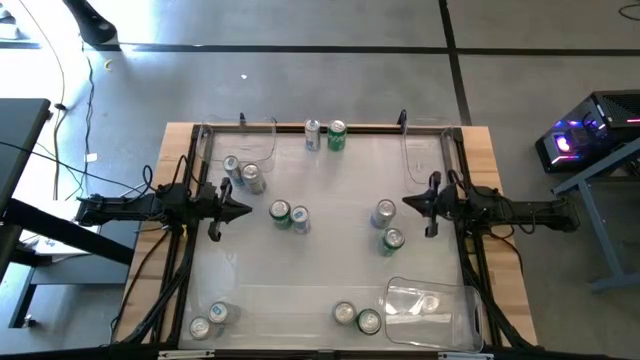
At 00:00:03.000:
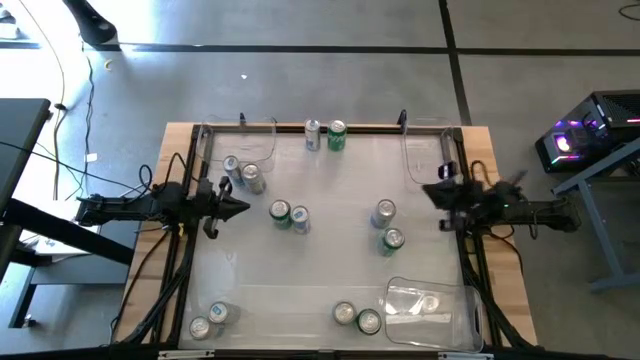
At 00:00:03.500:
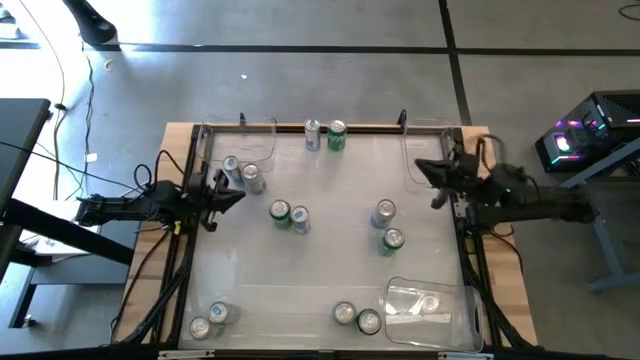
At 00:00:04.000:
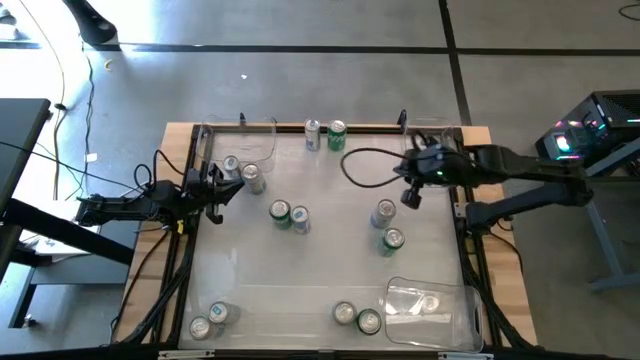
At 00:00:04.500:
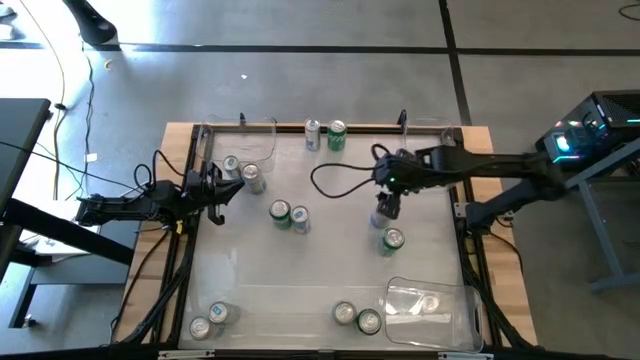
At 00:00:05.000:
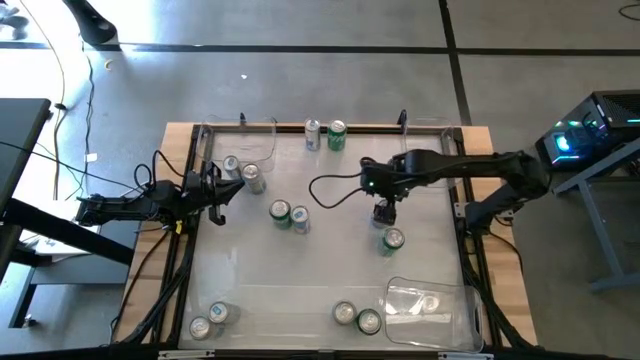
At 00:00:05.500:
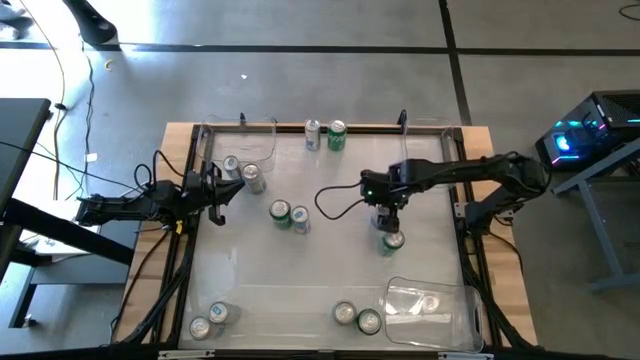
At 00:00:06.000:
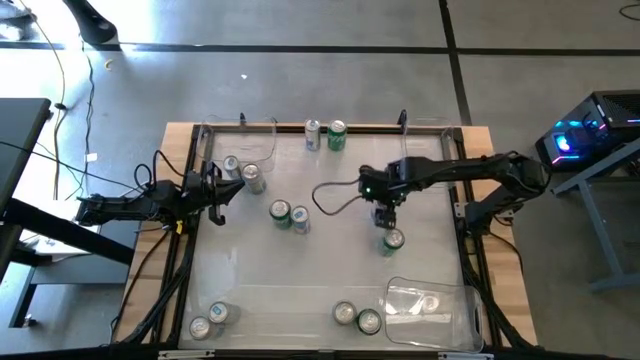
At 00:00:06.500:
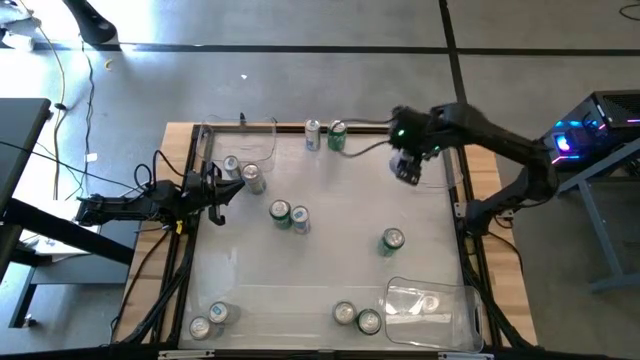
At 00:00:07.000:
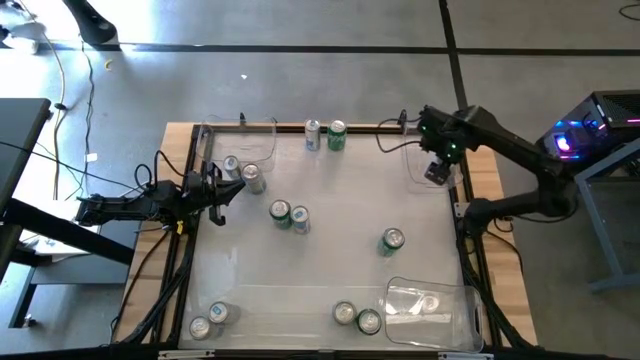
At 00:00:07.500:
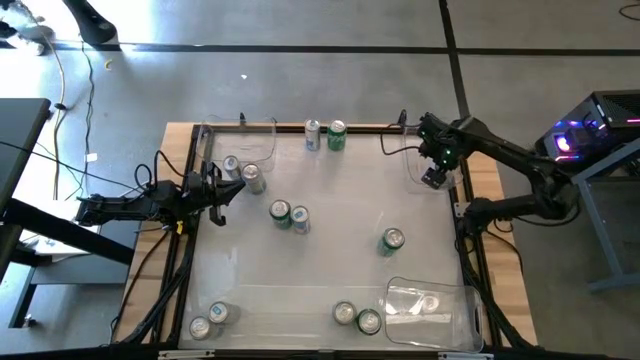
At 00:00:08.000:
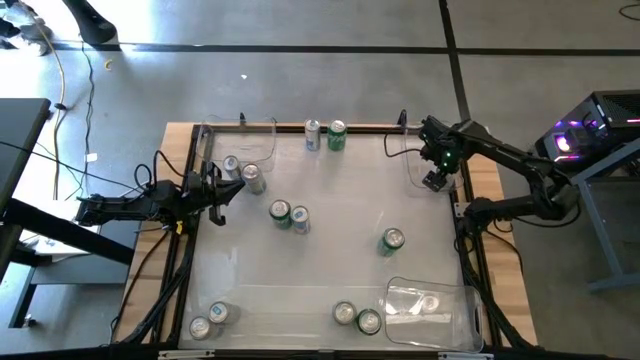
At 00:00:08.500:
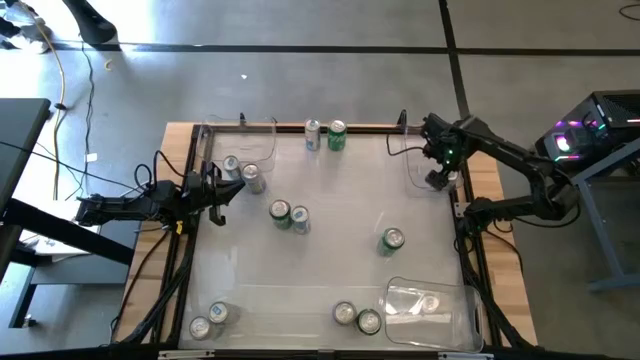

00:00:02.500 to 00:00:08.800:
Task: Sort soda cans
Put the top right blue white can into the top right transparent bin

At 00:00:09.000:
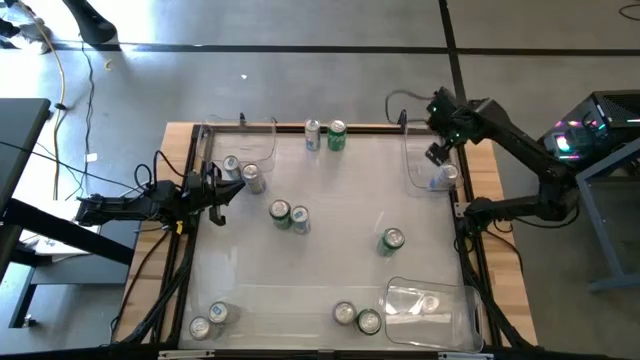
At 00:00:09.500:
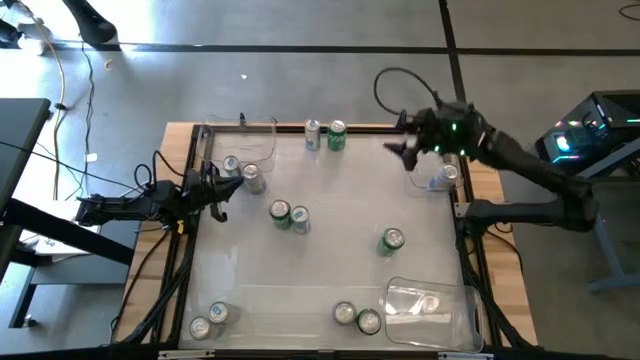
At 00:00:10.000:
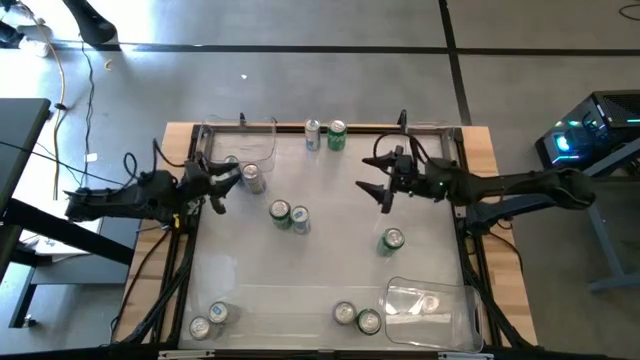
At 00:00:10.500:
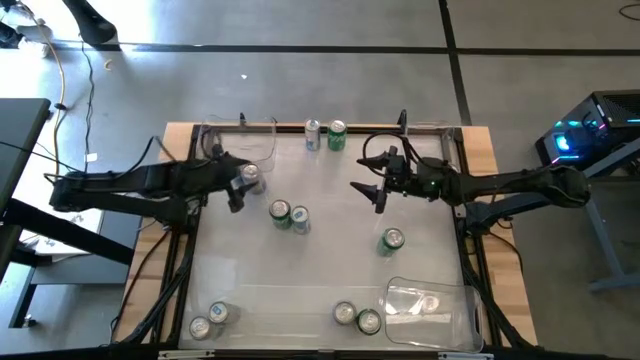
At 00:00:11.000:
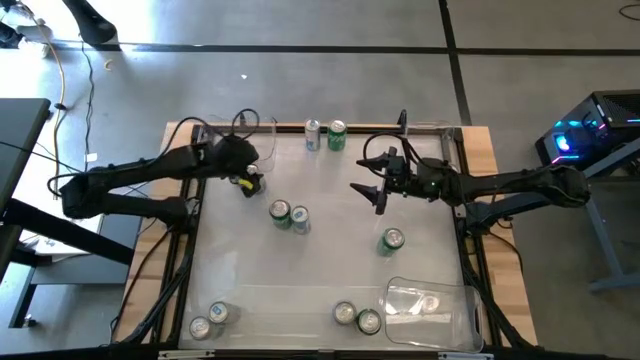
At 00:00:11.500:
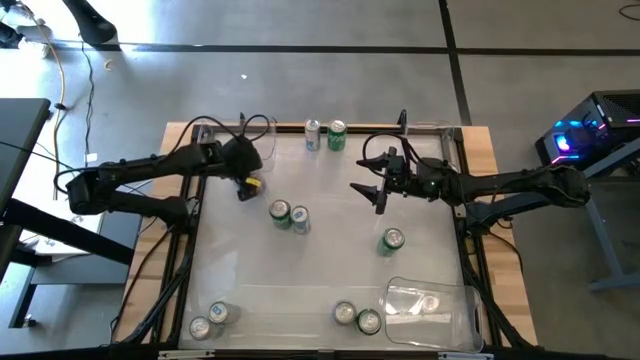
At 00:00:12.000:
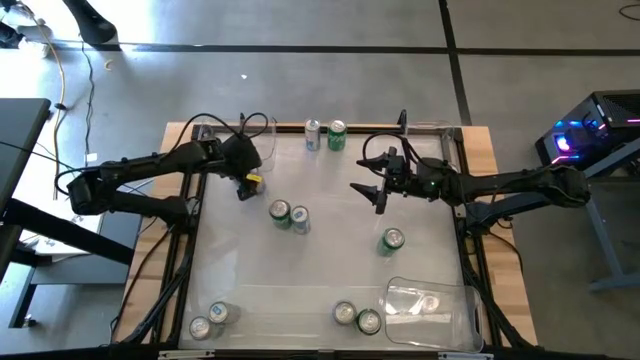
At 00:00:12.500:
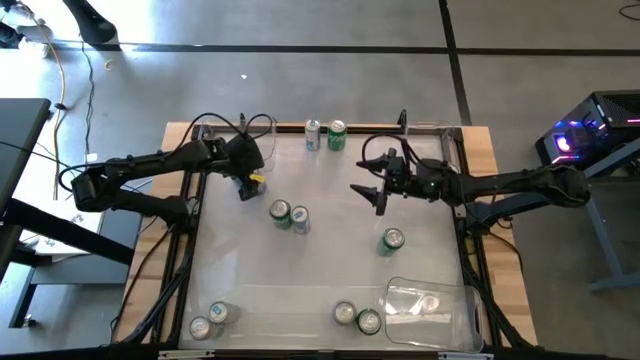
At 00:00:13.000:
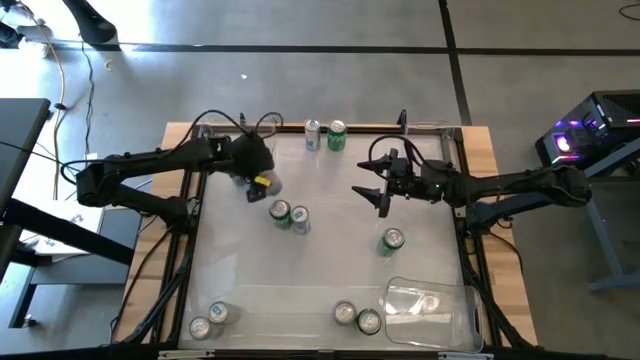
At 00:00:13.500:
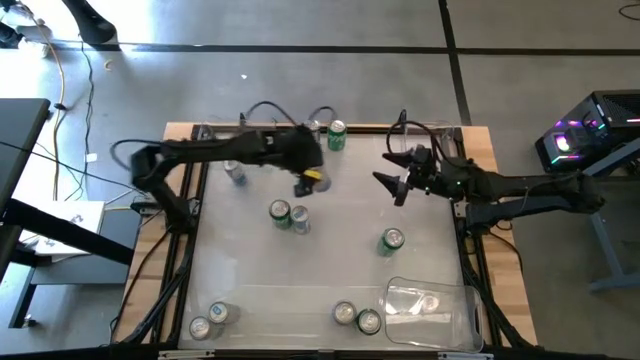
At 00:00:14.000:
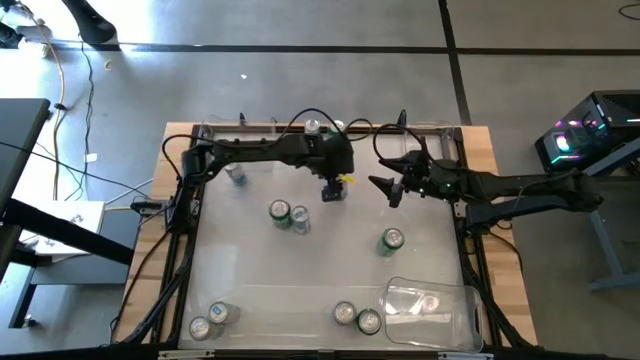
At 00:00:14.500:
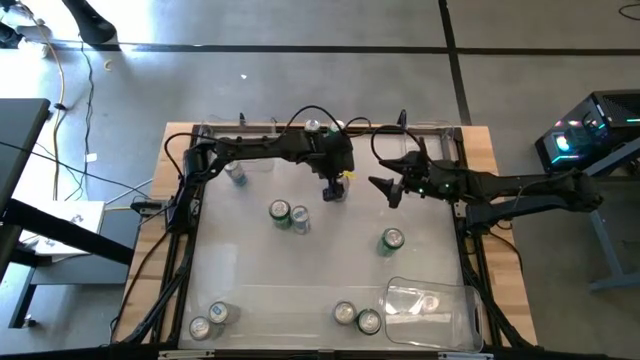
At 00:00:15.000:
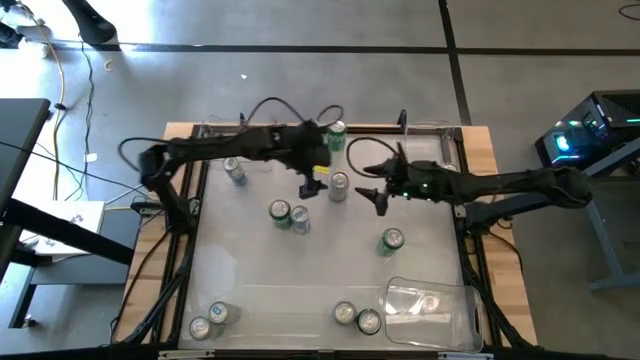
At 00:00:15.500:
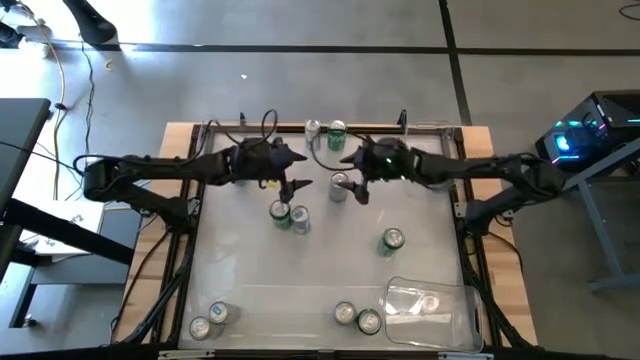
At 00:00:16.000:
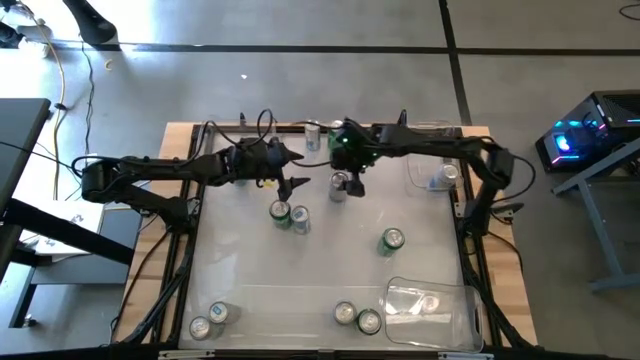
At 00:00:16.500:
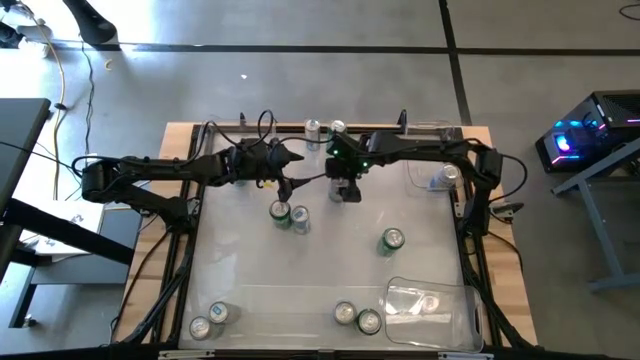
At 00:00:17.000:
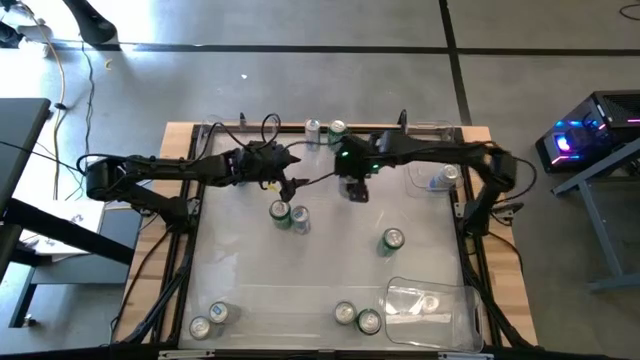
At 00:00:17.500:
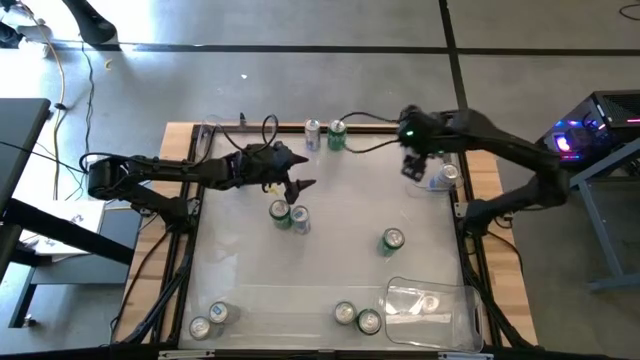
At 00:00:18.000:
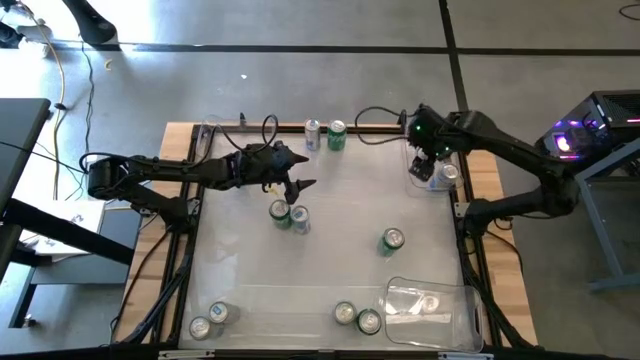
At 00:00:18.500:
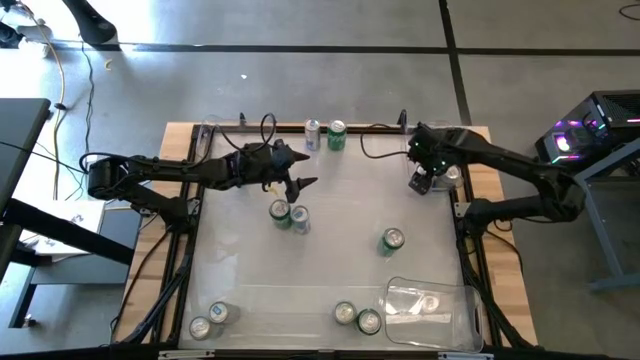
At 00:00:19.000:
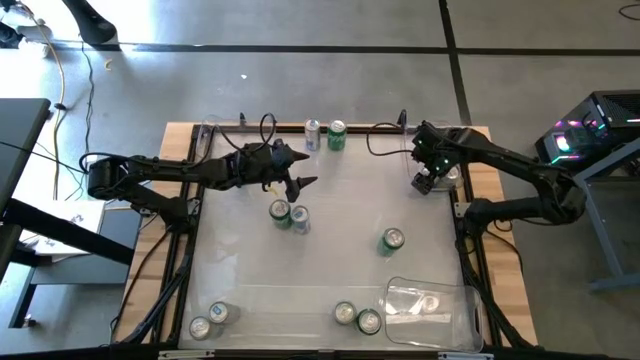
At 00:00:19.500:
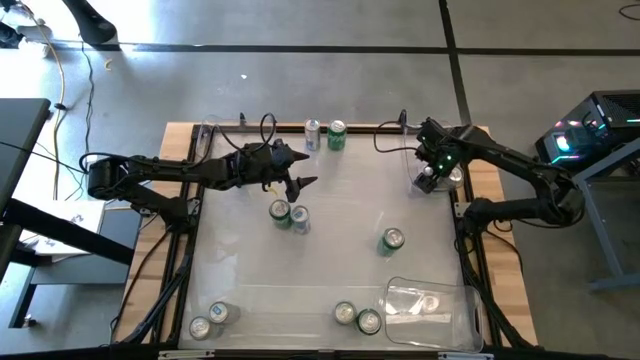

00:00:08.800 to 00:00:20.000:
Put the top blue white can into the top right transparent bin

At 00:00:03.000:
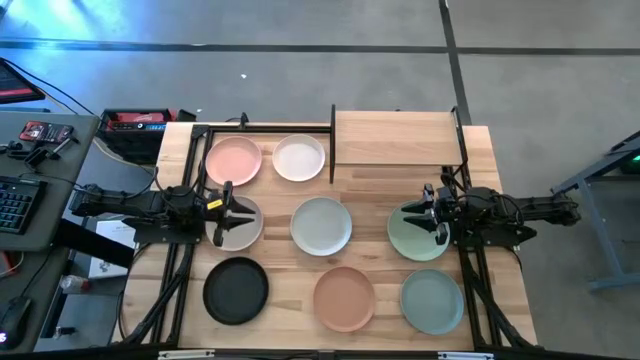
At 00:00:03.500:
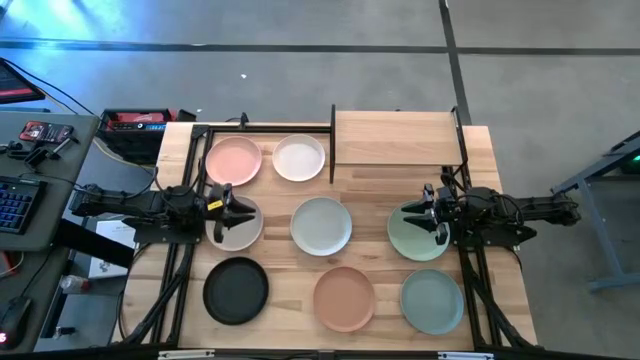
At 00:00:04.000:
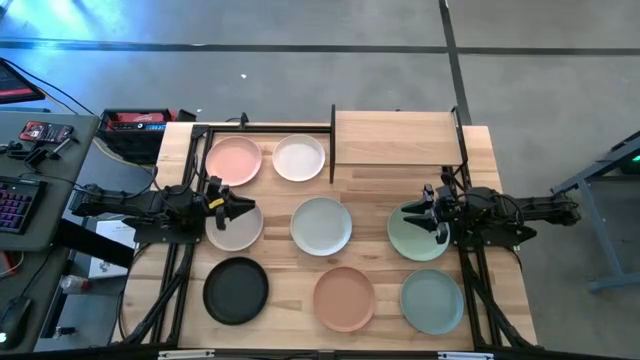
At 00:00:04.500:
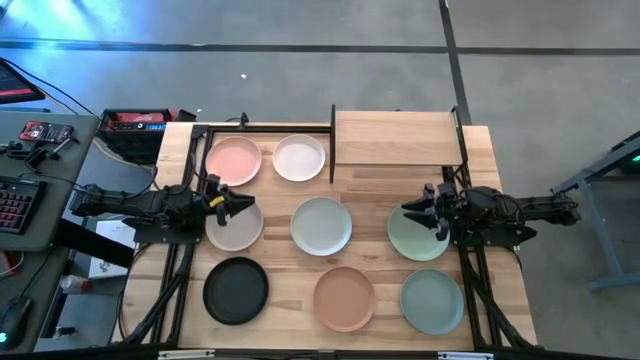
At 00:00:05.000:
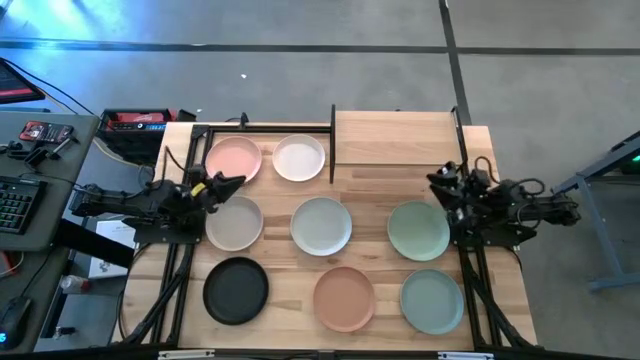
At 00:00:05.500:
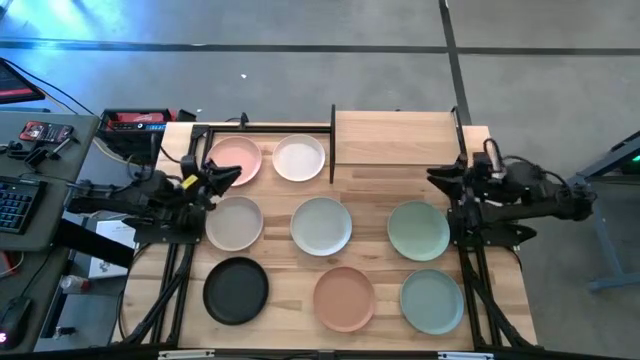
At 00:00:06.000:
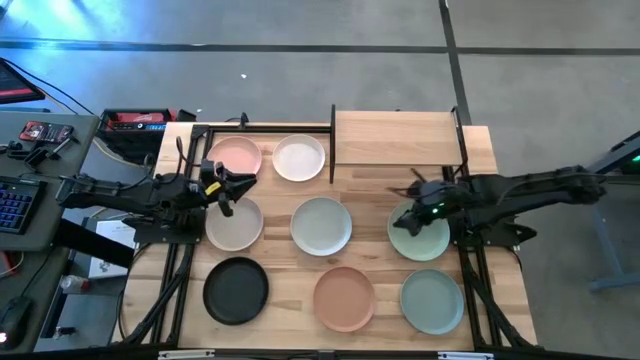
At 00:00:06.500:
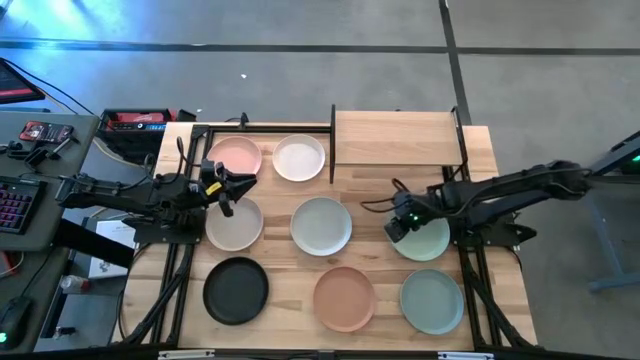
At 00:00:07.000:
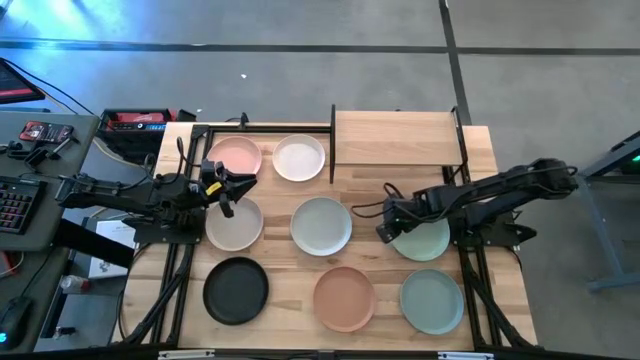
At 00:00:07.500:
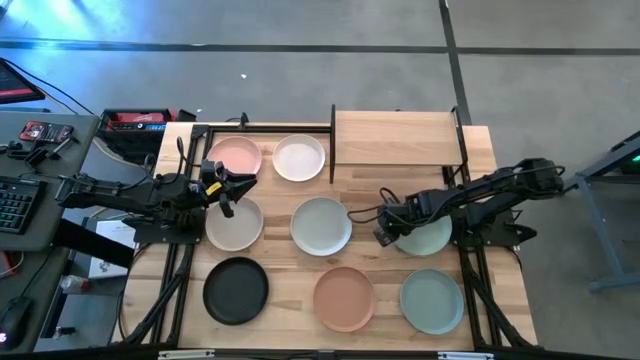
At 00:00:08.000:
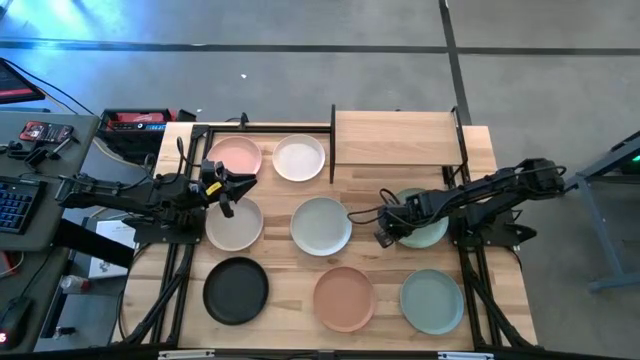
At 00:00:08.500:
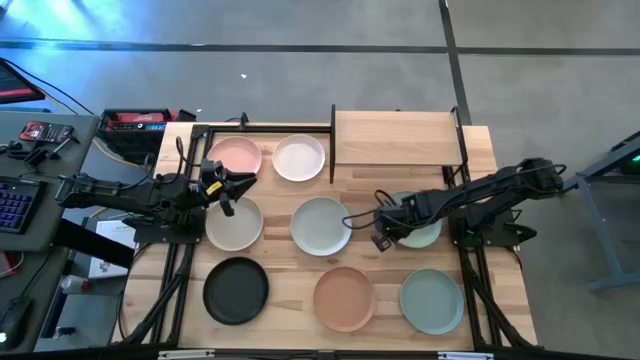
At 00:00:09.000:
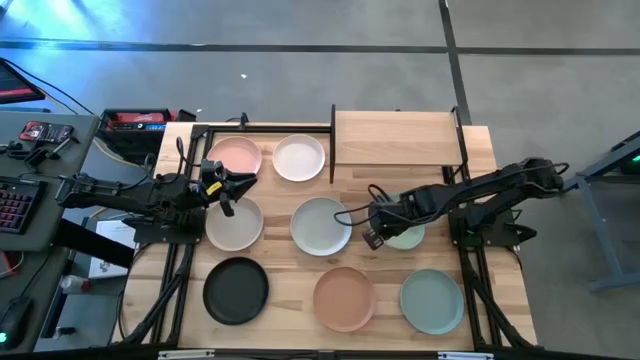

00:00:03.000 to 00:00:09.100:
Task: Place and stack plates onto a shelf
Put the green plate on the shelf
